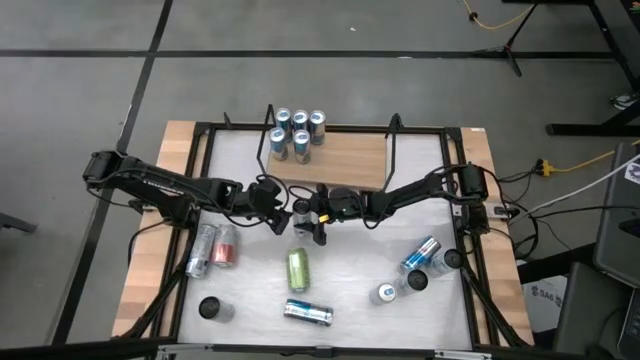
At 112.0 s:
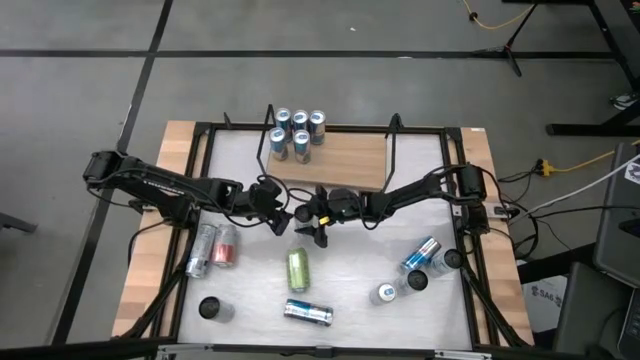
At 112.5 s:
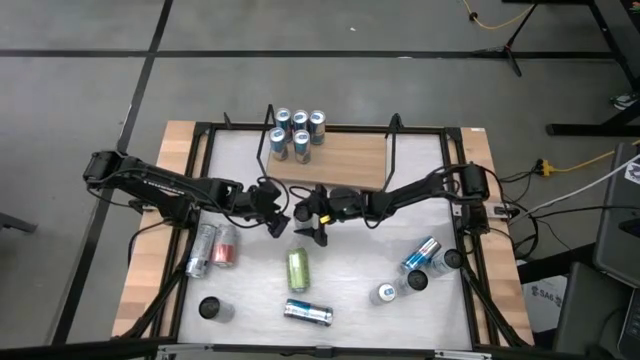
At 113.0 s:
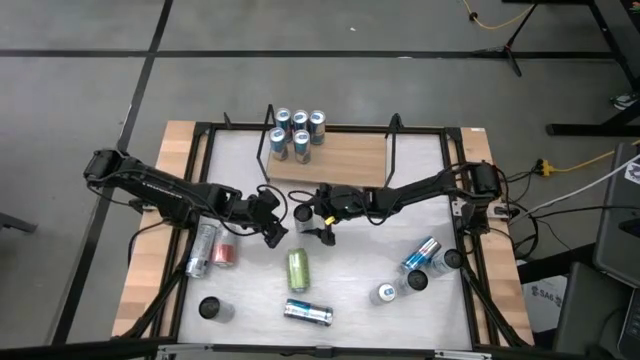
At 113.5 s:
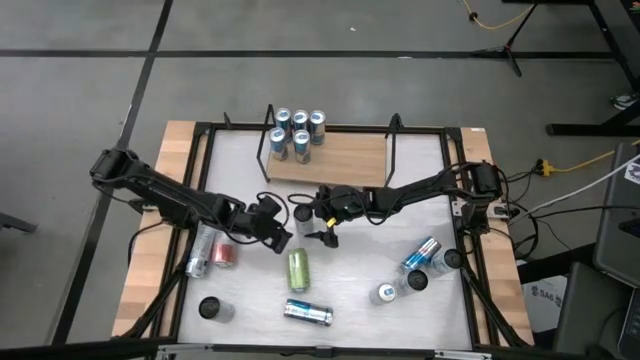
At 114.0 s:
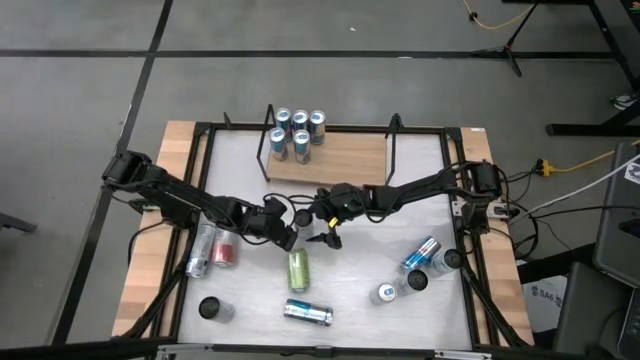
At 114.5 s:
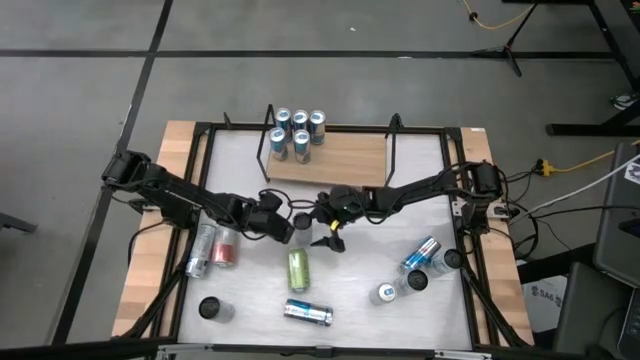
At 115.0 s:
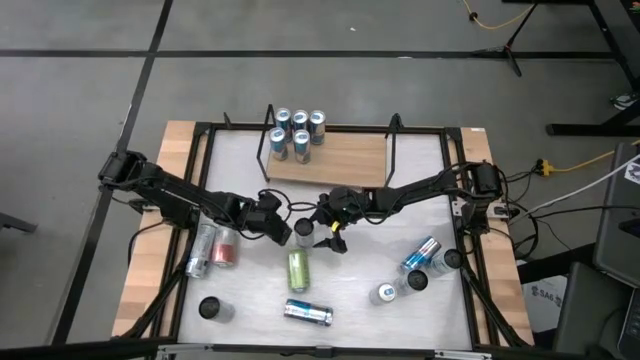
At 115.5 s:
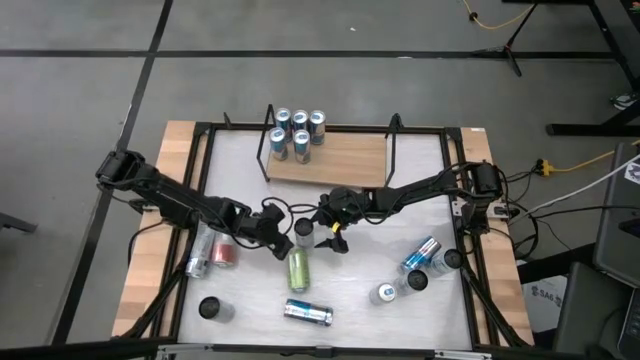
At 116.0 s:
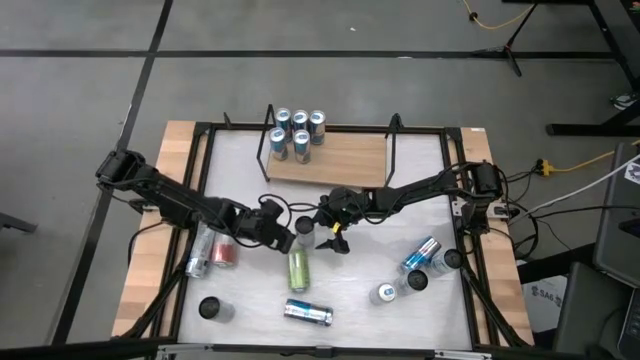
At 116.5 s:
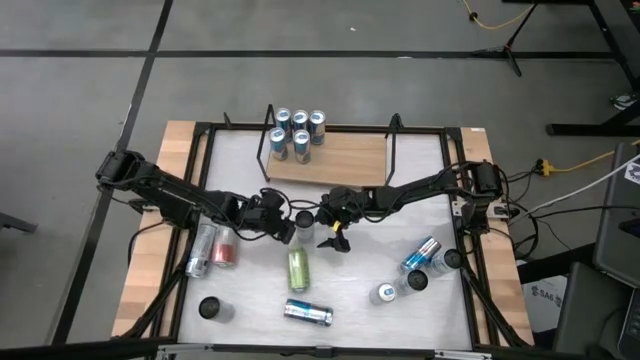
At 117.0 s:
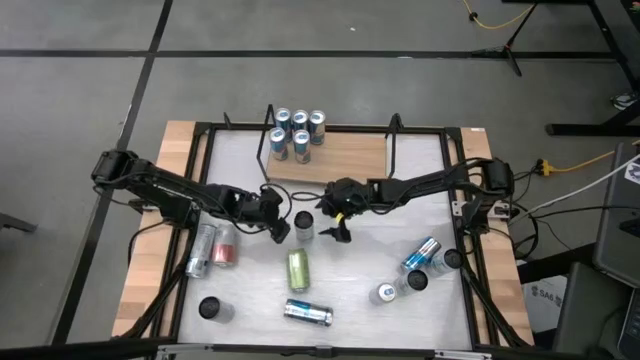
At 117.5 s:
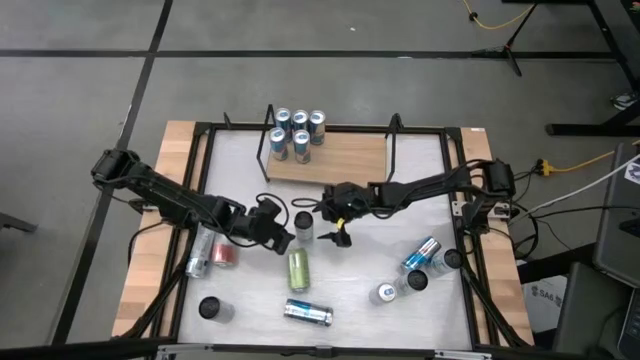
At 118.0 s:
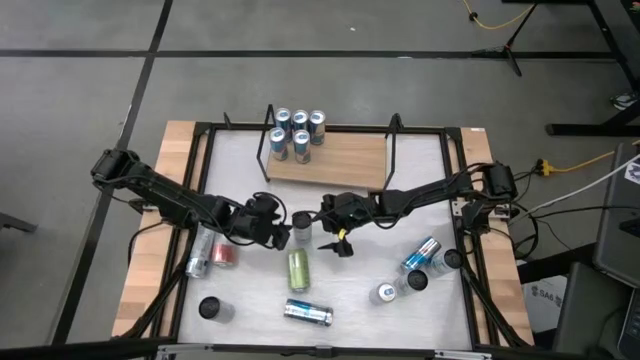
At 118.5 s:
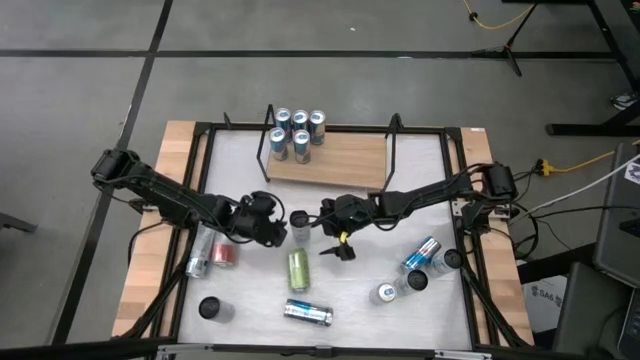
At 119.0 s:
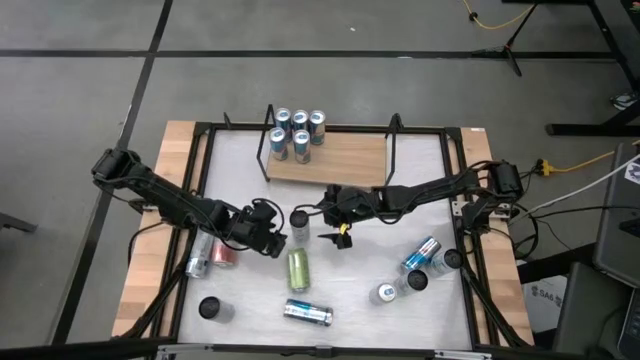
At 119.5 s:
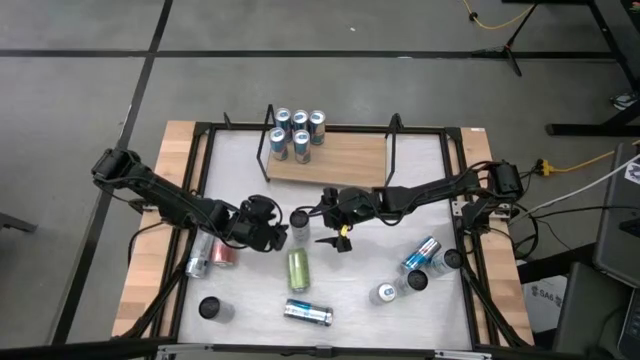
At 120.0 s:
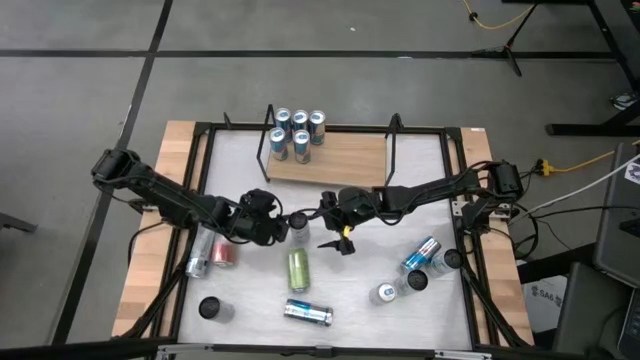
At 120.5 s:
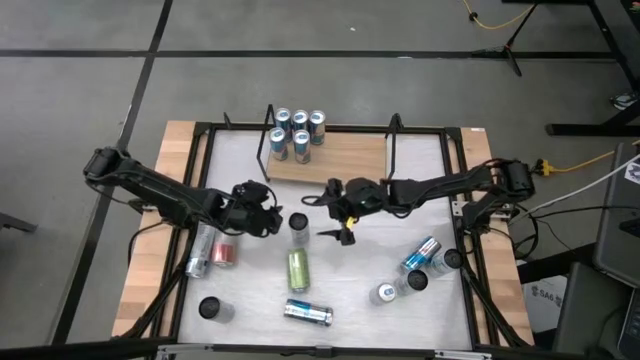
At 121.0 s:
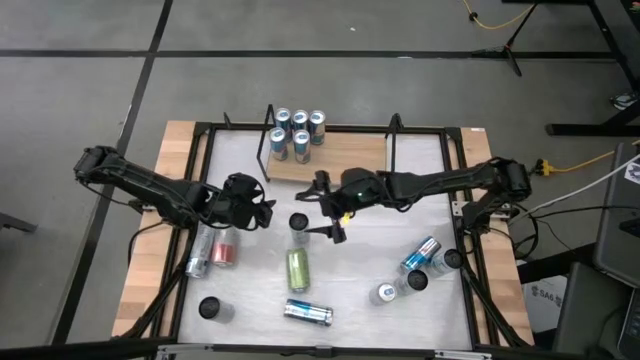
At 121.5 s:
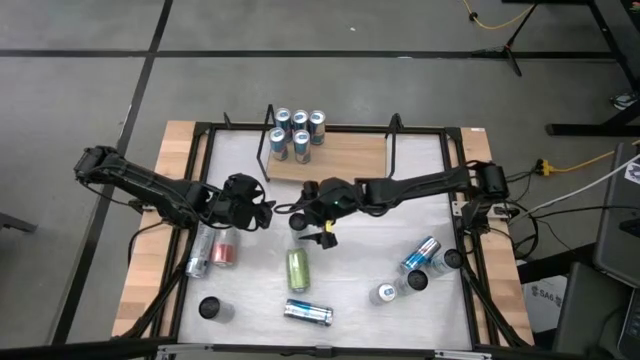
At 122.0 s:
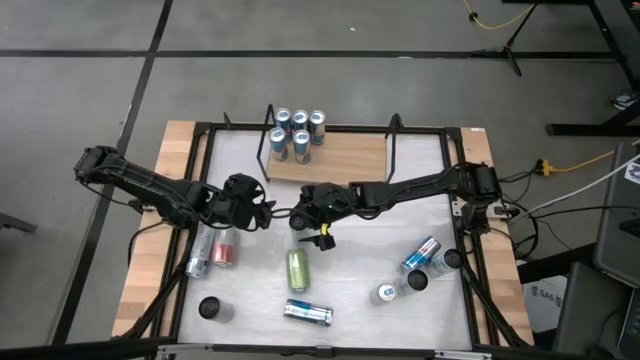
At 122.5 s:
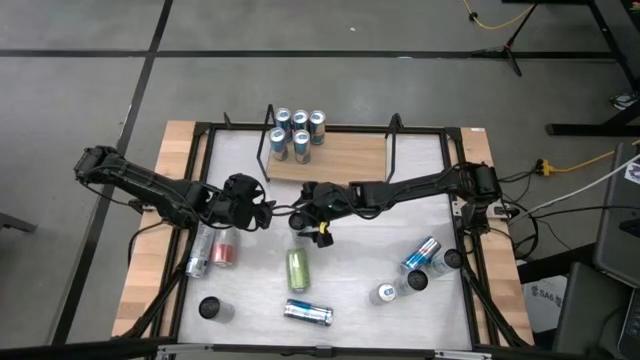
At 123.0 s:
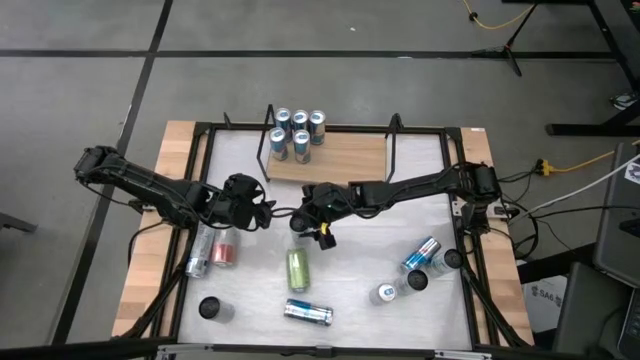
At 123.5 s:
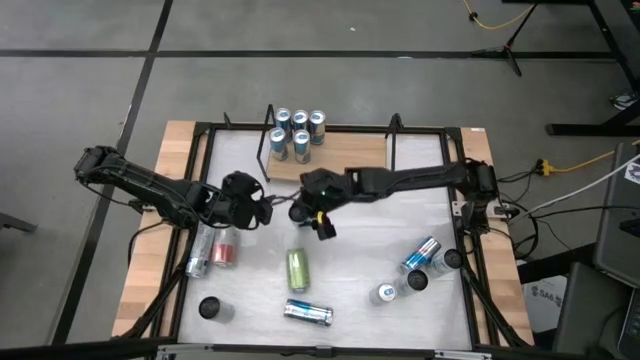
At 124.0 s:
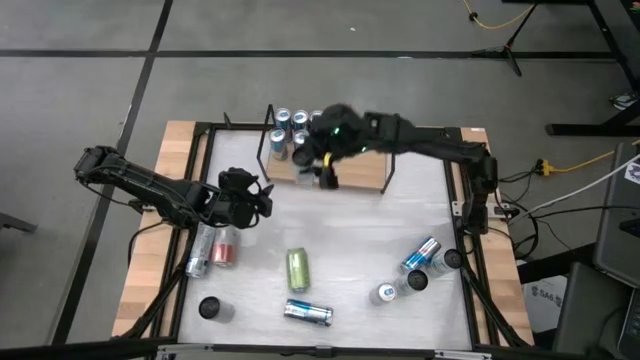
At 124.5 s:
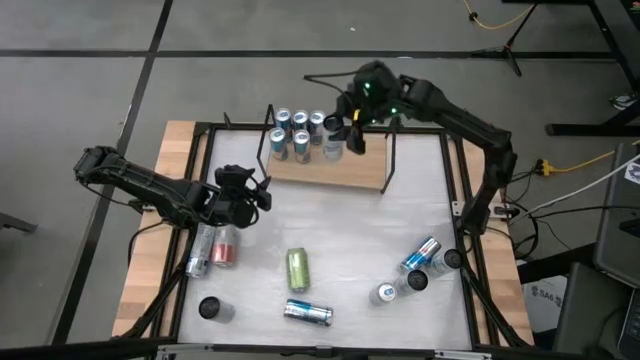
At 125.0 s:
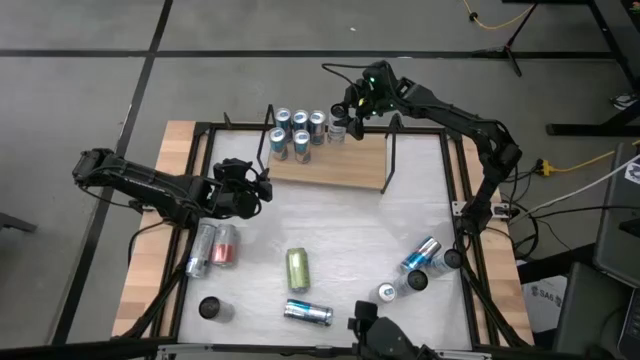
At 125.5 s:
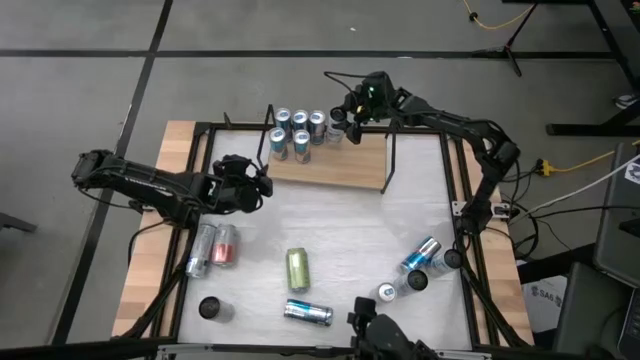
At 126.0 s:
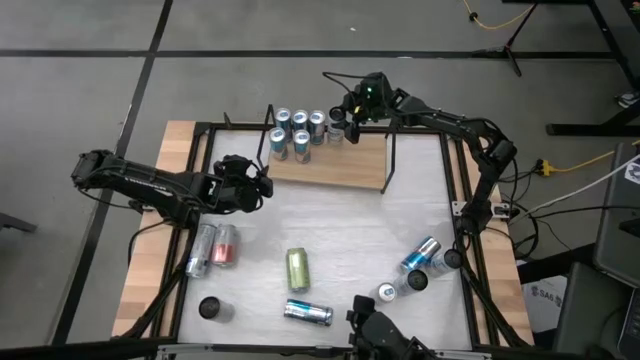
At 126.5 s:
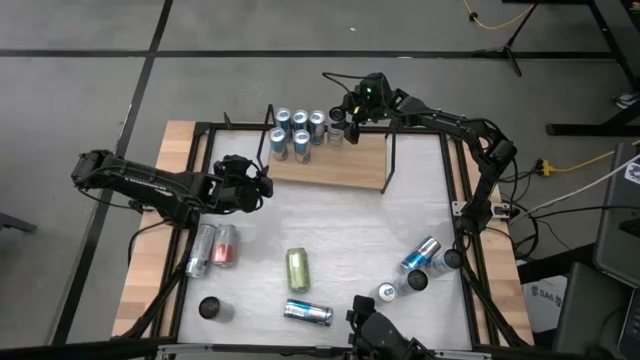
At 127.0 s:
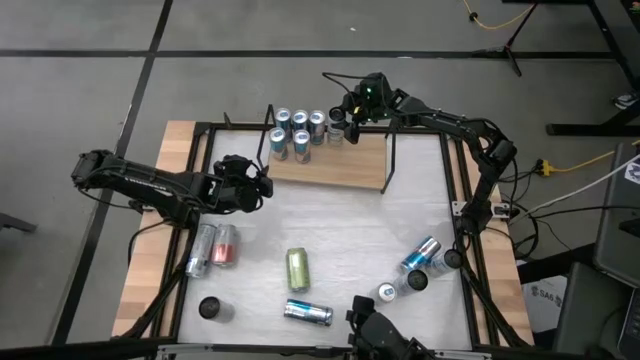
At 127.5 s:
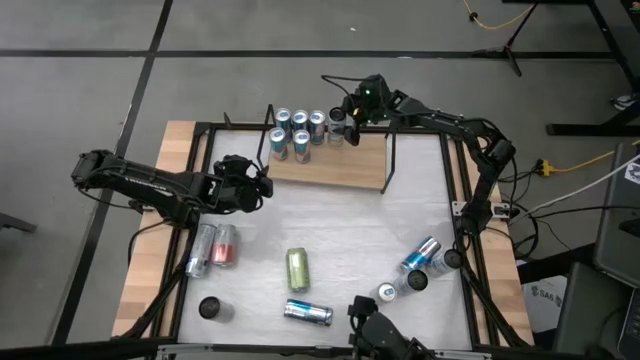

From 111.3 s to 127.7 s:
Task: Place canned beverage on shelf
Put the white blue soda can on the shelf

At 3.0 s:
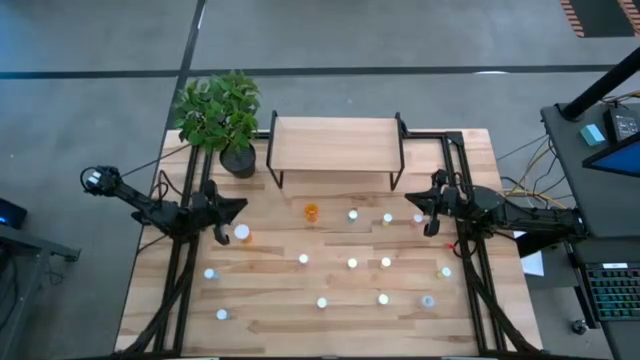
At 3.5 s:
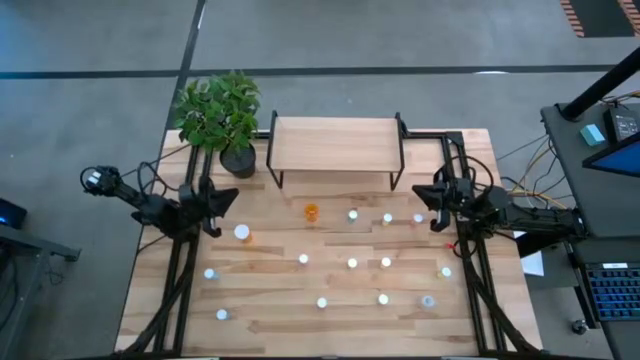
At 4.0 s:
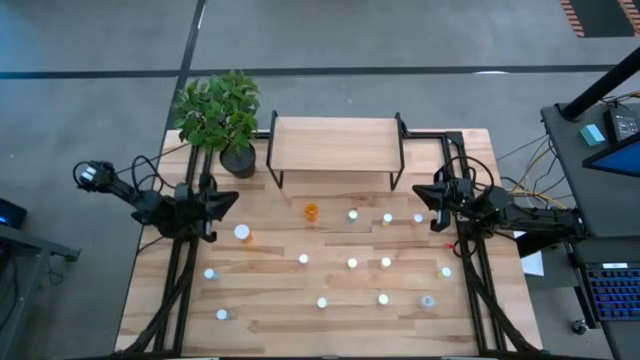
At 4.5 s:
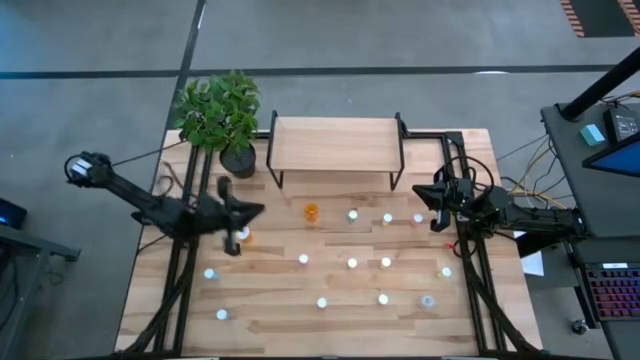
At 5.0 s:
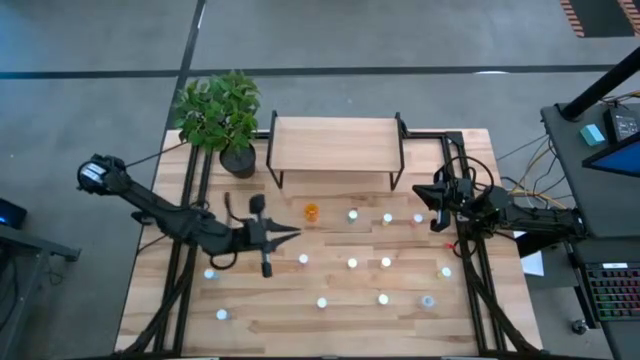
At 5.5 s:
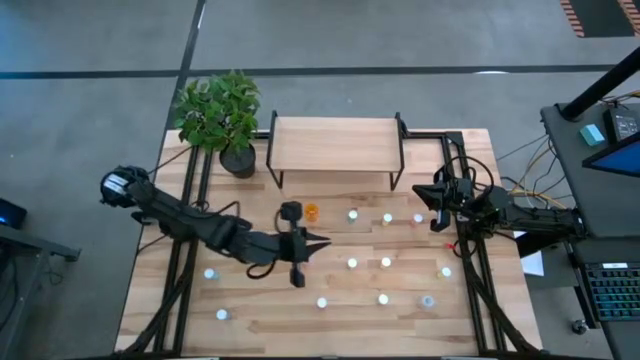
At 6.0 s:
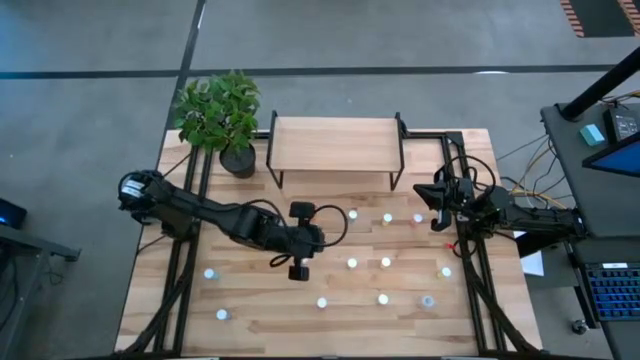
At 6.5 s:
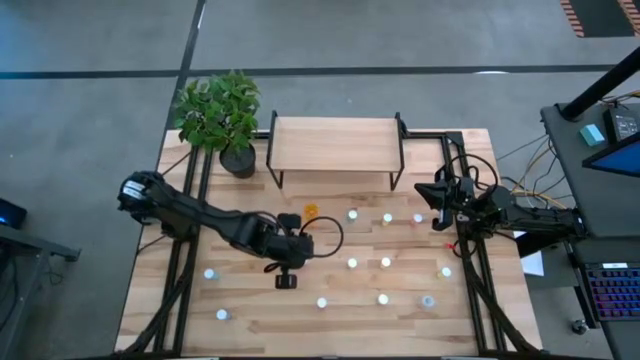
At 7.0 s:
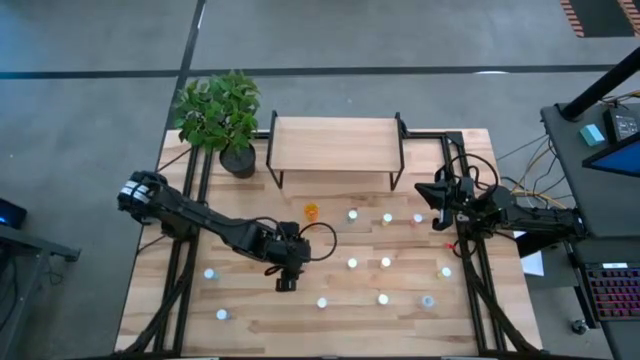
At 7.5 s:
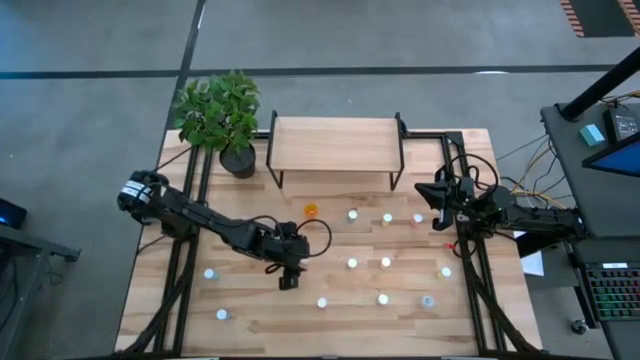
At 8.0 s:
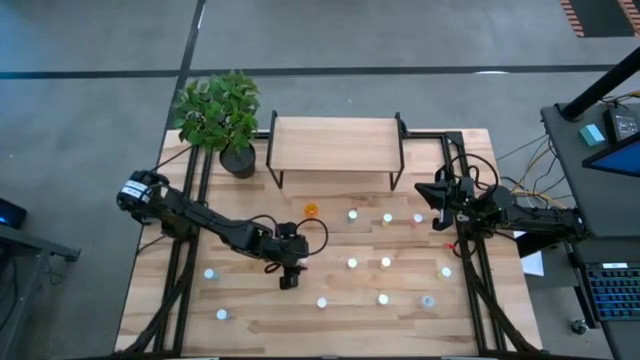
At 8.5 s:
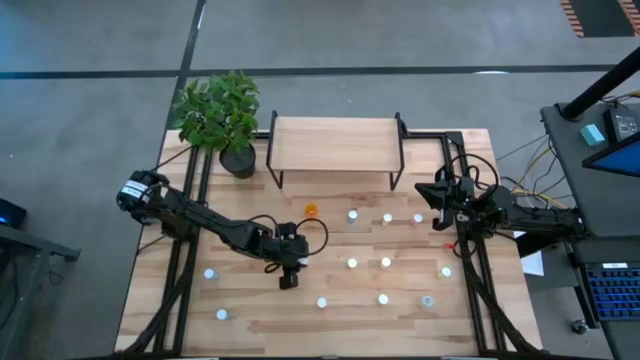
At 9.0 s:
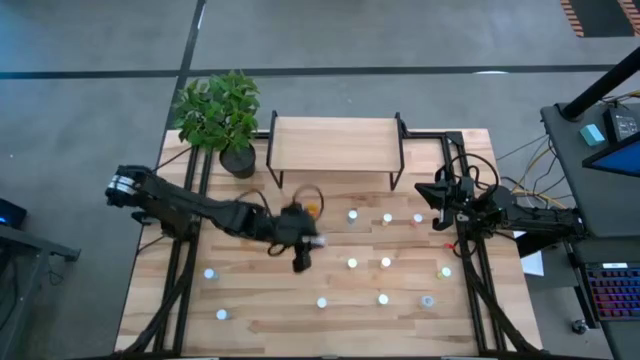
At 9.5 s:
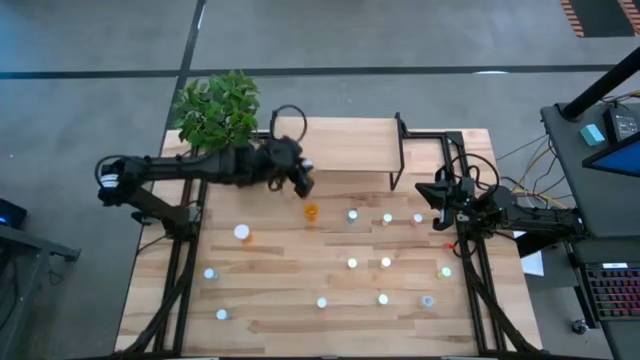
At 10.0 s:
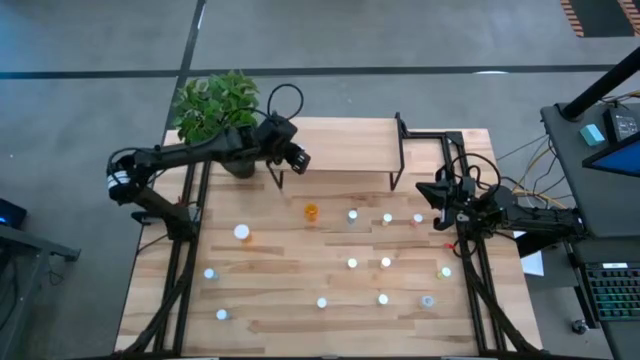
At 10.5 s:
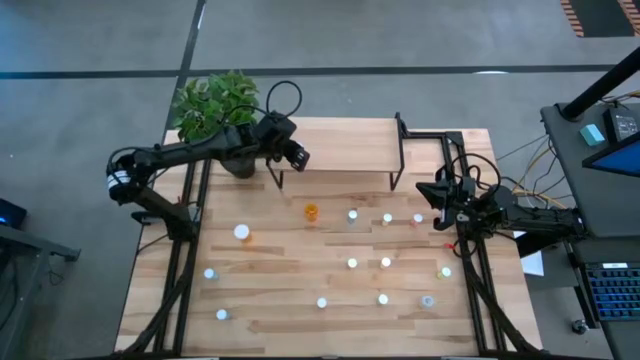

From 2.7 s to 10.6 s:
Task: Pick and place medicine bottles onto shelf by color
Put the pink pill bottle on the shelf
